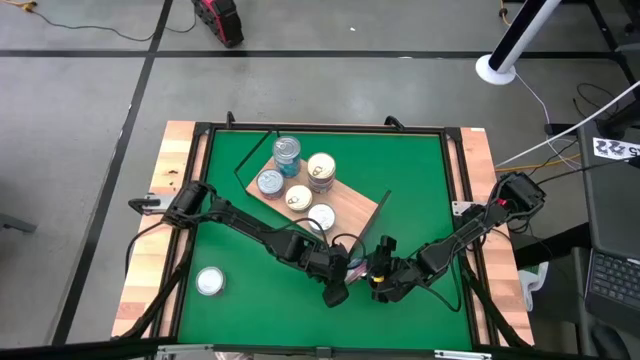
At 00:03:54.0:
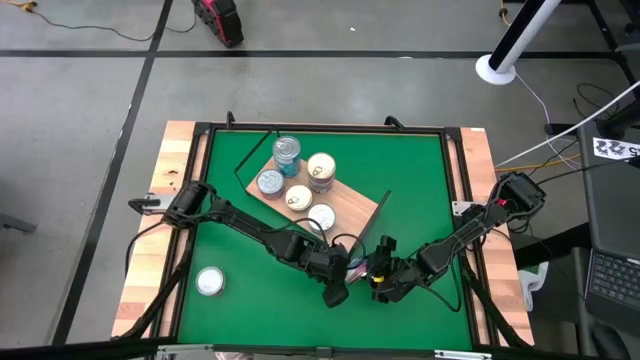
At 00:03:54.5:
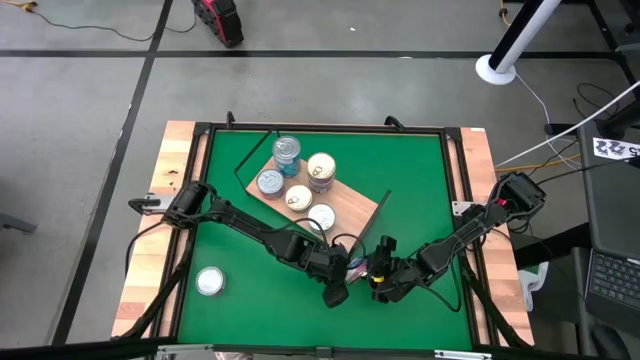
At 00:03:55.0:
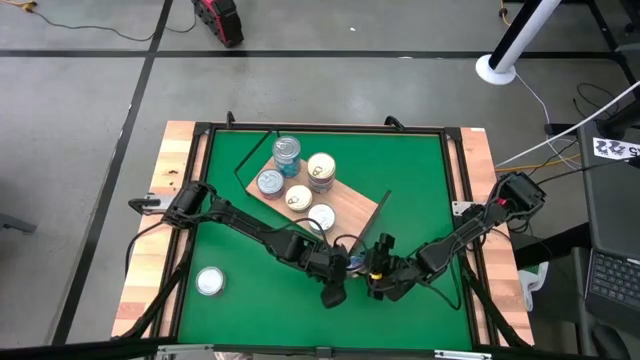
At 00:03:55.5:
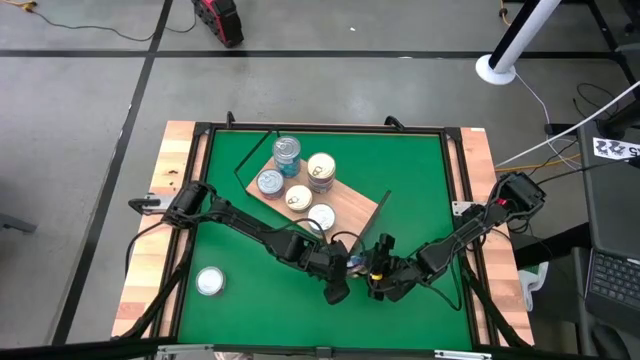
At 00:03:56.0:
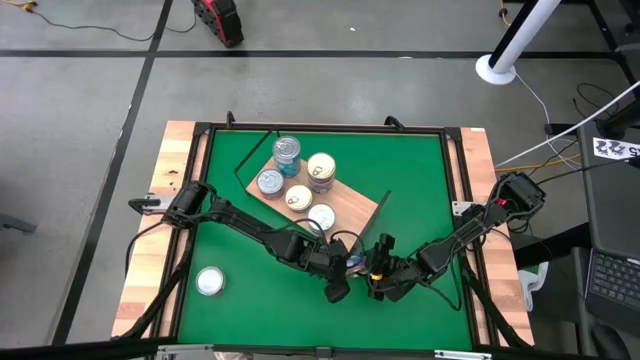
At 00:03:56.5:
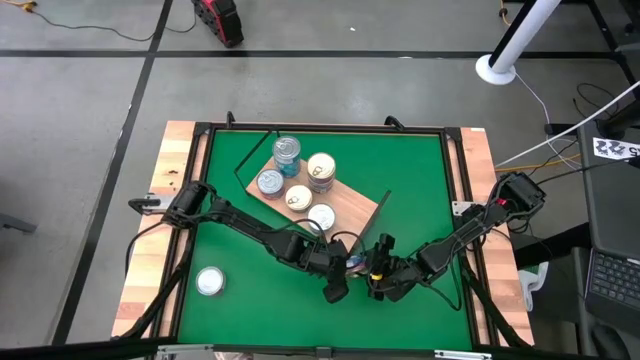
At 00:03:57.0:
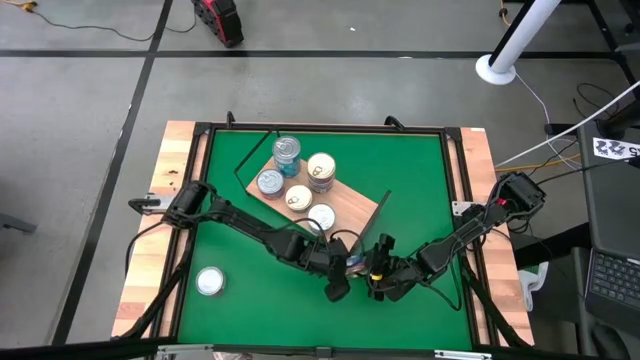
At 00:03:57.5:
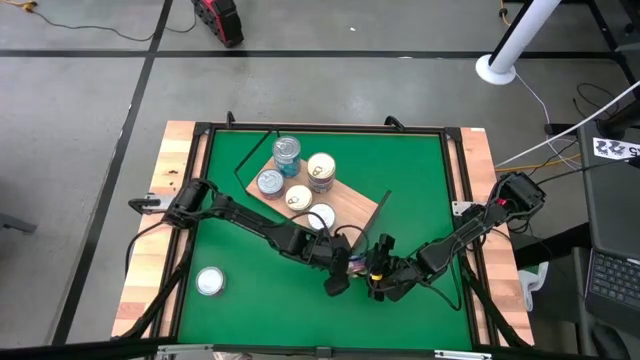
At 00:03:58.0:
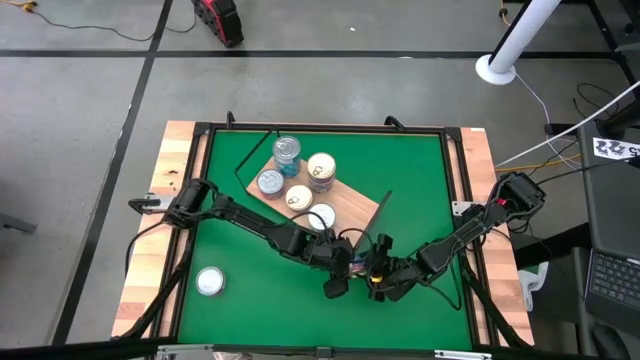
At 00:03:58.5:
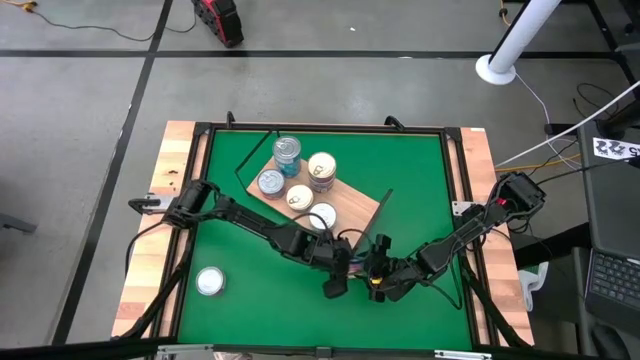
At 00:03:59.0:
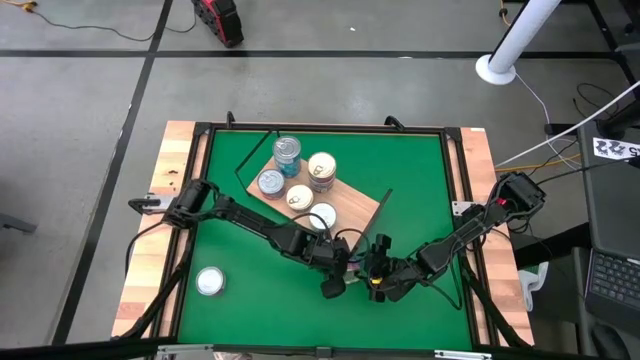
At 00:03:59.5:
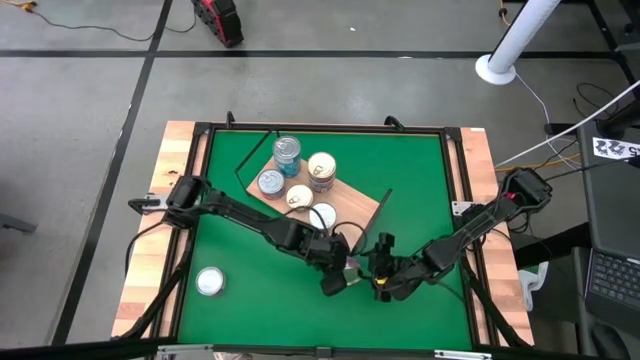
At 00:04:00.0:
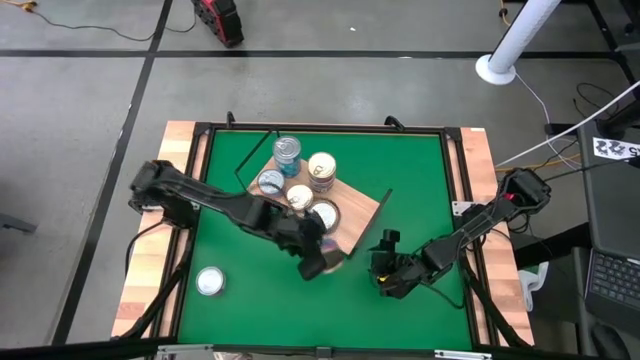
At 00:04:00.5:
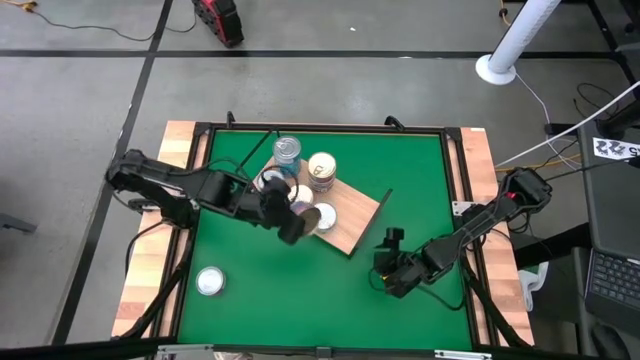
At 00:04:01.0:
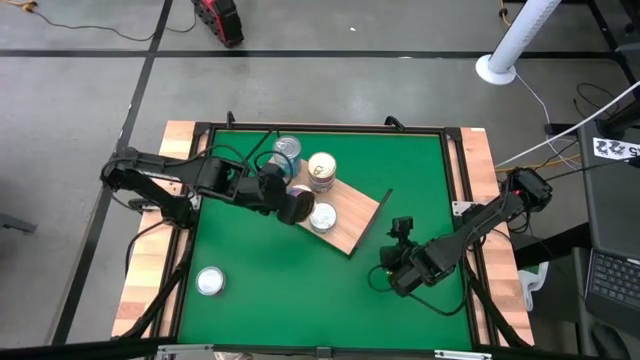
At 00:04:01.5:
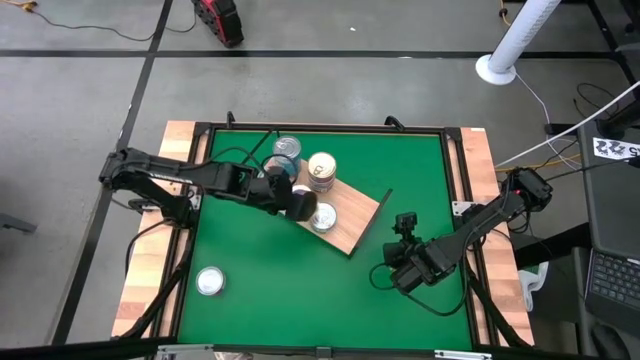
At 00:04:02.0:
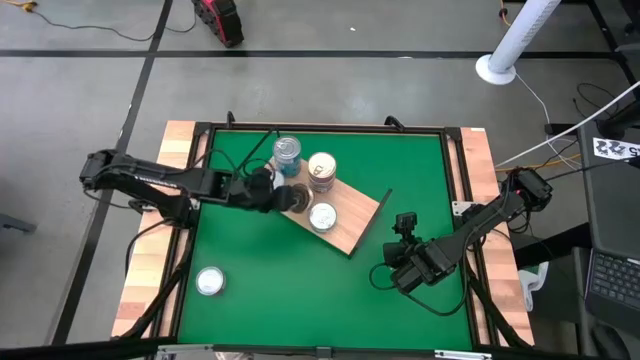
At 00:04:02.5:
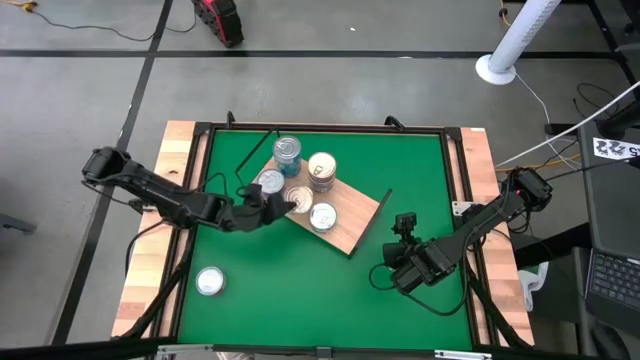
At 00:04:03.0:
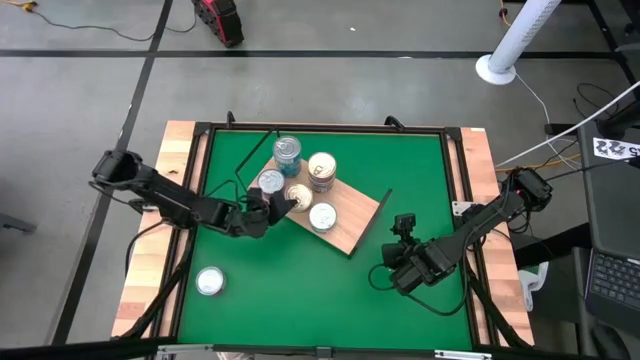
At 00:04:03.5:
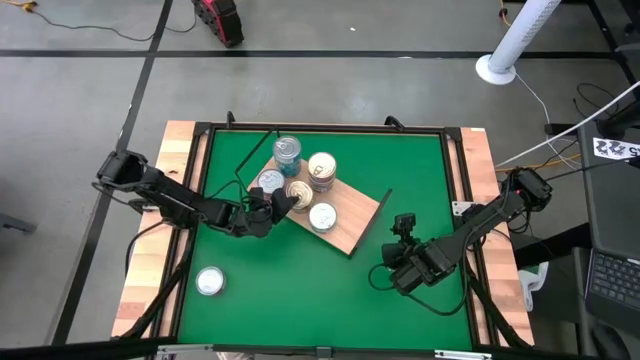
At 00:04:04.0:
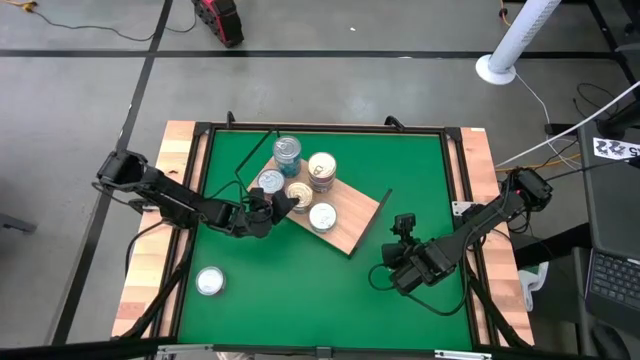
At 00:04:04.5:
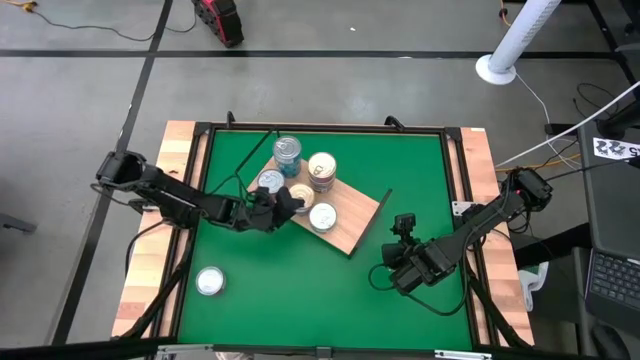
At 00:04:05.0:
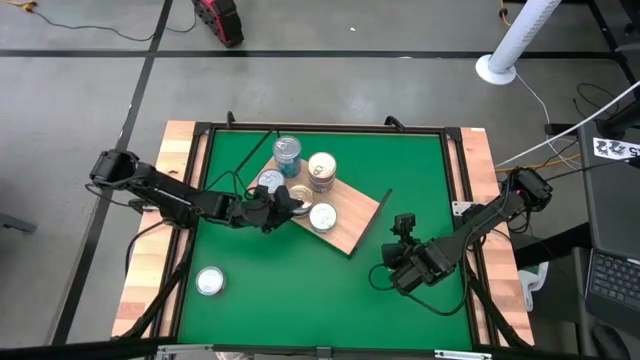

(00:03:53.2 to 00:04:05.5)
Task: Stack canned seafood by type on shelf
Stack the blue and pink tuna can on top of the blue and pink tuna can on the shelf

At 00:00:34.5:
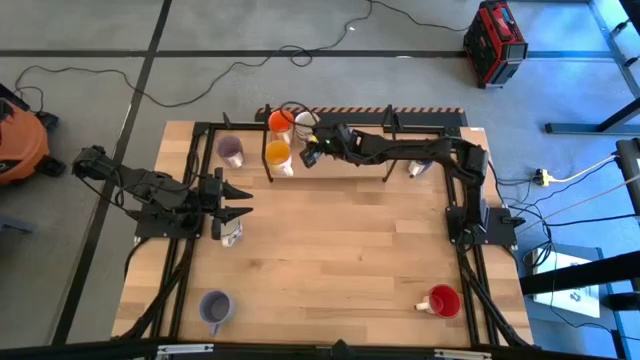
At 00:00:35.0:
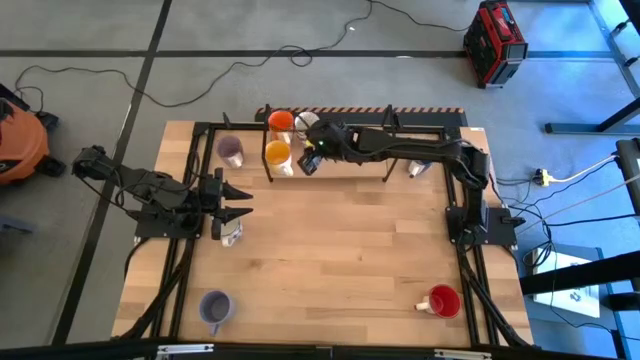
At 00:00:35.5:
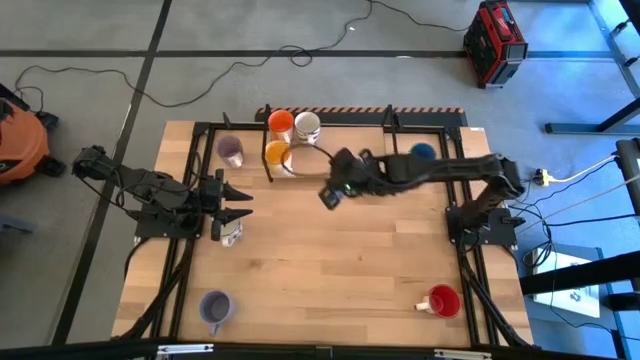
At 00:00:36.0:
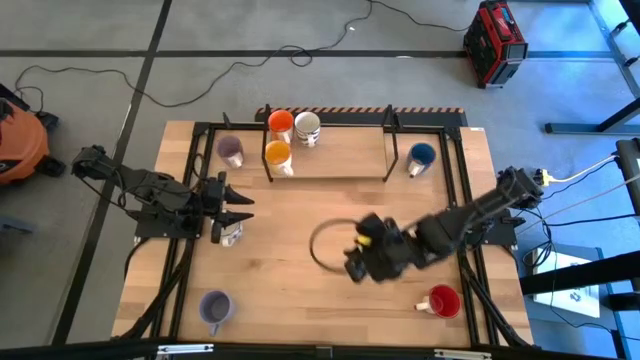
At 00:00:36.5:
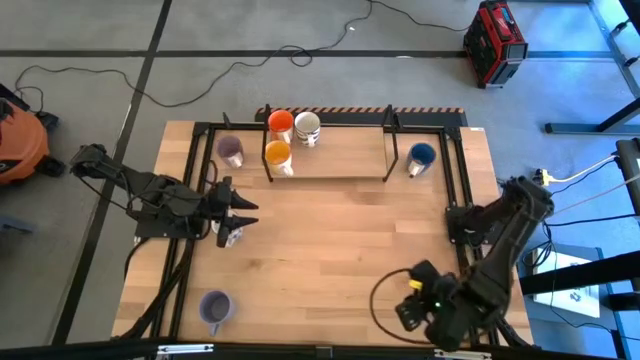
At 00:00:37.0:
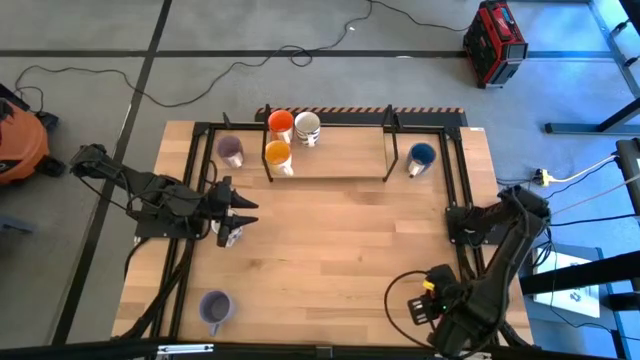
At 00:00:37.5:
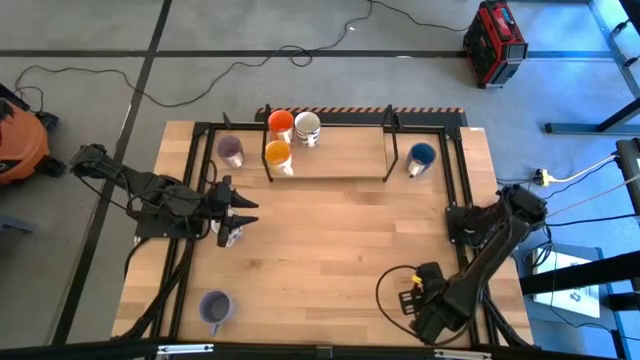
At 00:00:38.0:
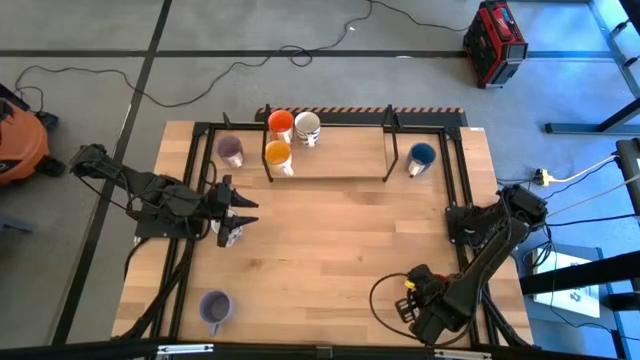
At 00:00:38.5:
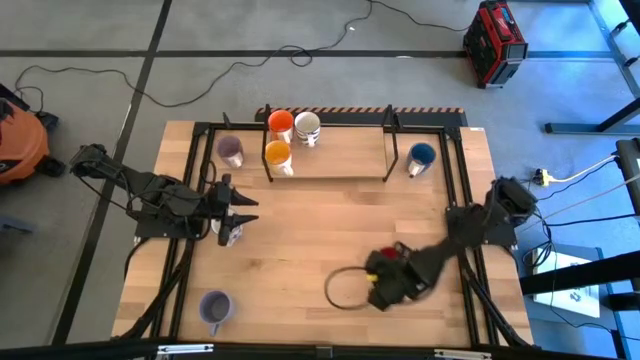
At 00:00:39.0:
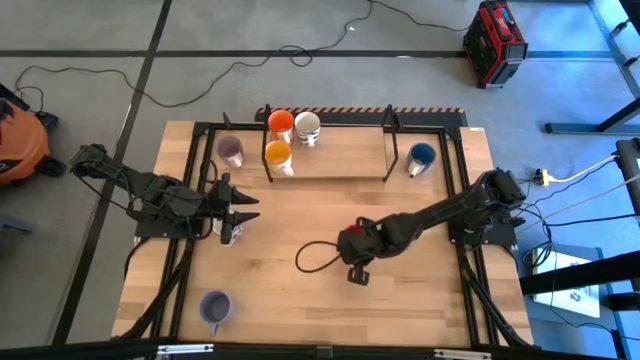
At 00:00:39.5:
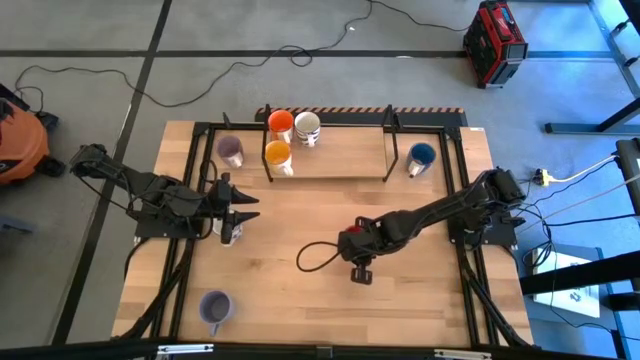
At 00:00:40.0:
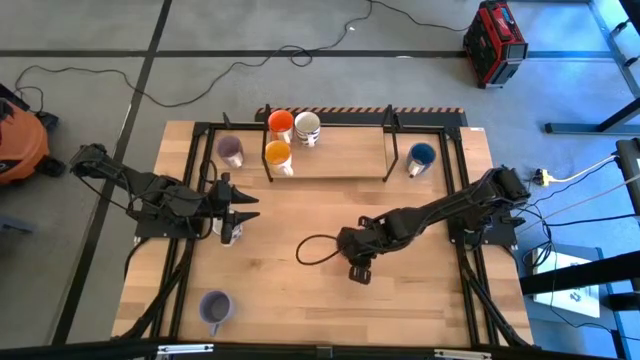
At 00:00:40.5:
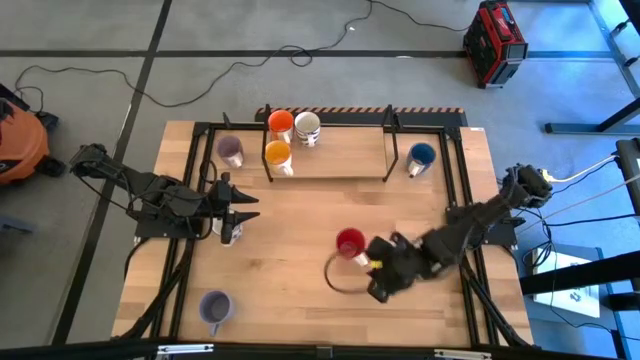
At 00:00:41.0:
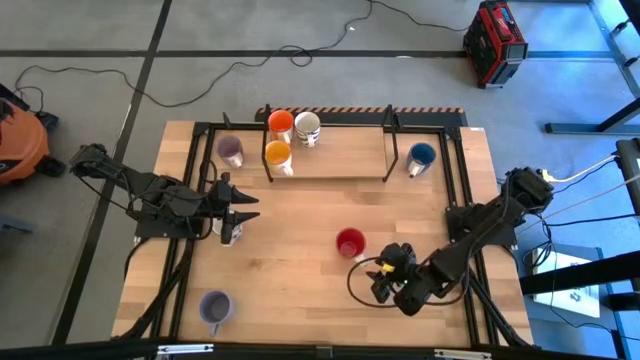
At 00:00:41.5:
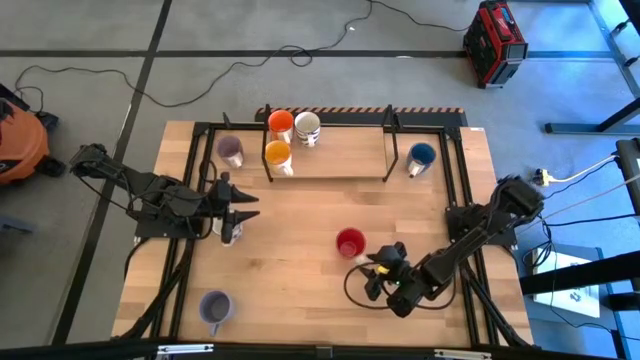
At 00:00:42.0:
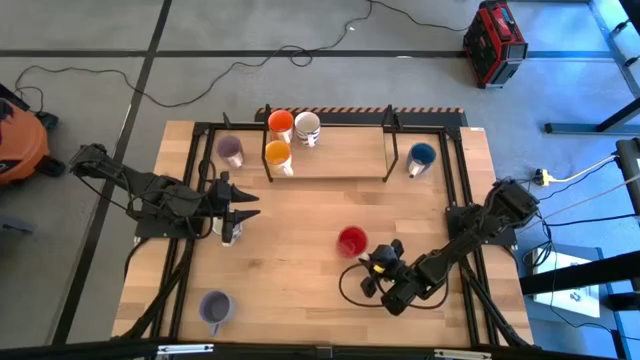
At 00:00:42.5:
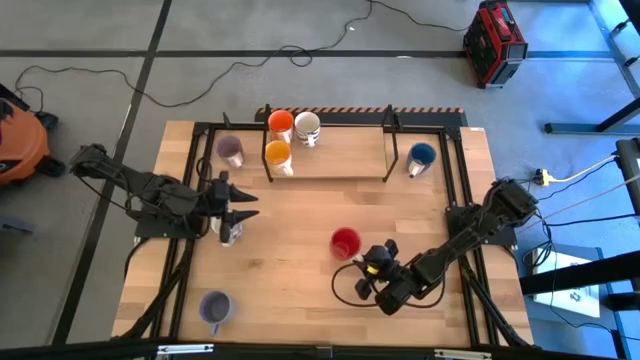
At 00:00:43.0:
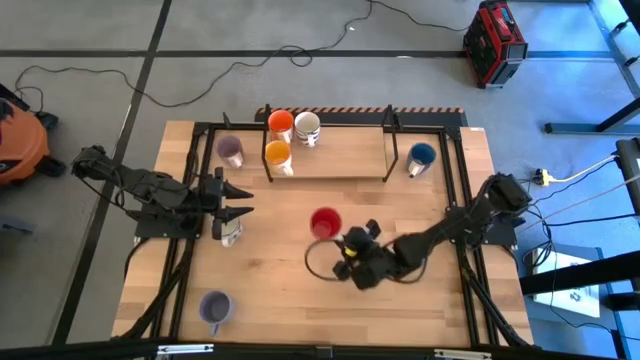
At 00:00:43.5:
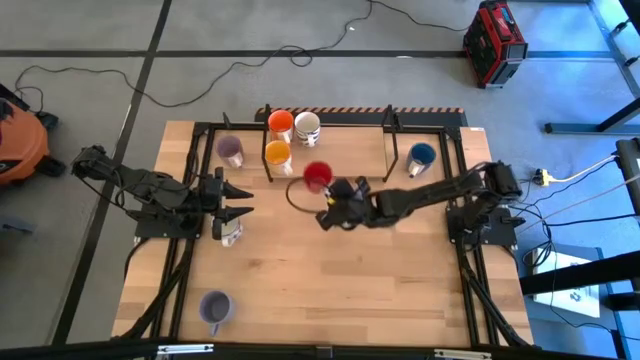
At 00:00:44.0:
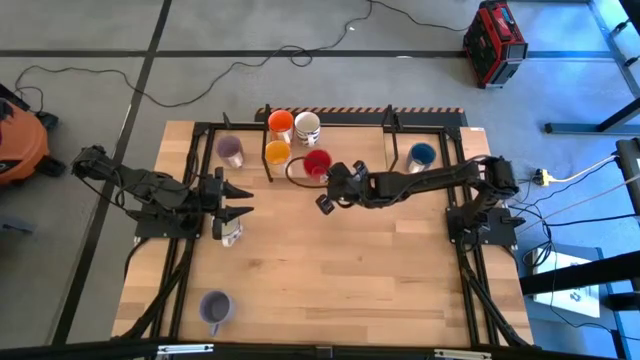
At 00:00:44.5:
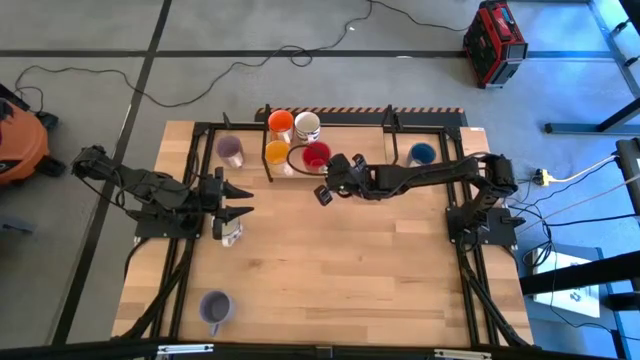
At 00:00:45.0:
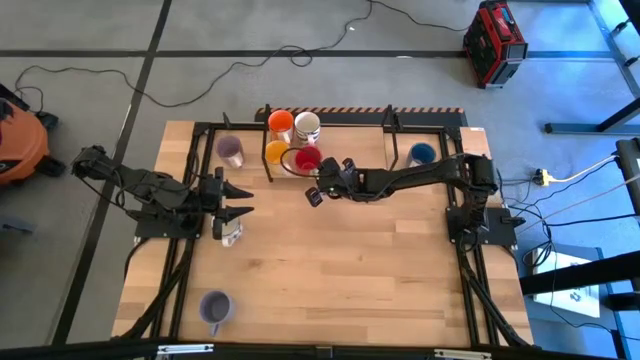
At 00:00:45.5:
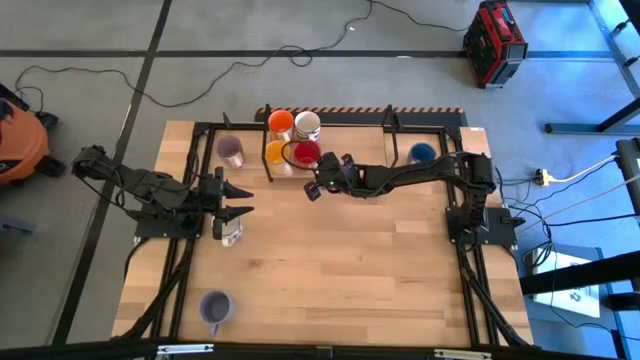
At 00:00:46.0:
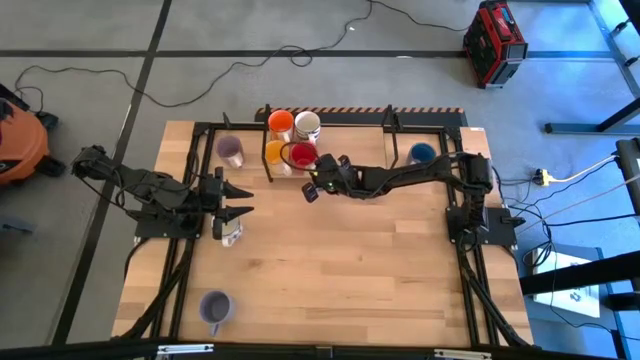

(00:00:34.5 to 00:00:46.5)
Task: Place coffee mugs
Put the red mug on the shelf aligned with the white mug
